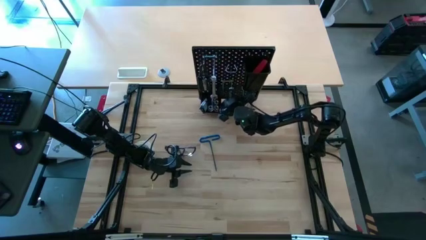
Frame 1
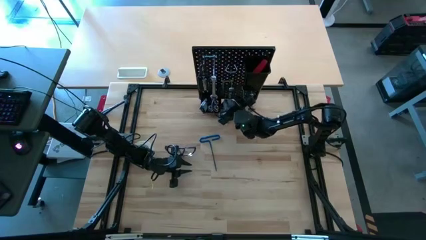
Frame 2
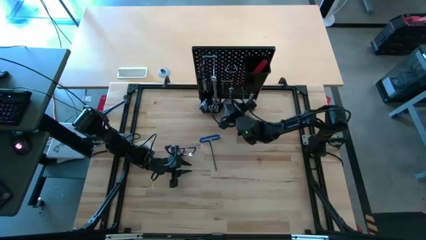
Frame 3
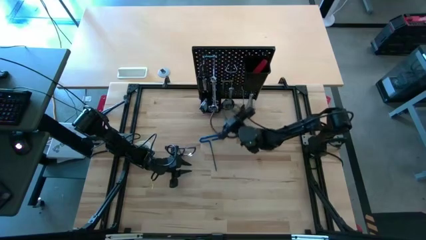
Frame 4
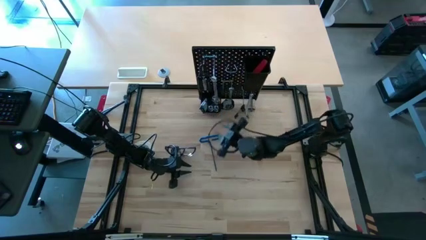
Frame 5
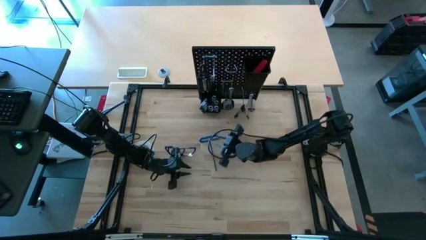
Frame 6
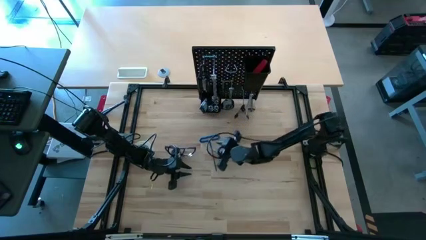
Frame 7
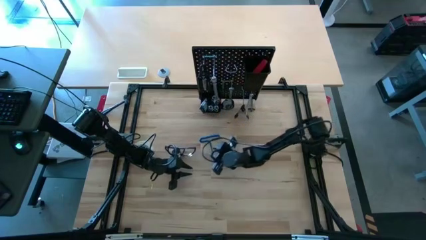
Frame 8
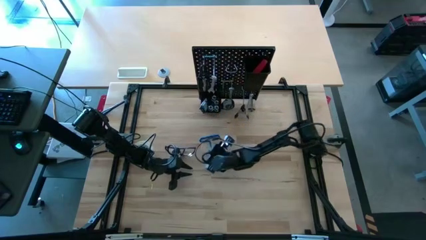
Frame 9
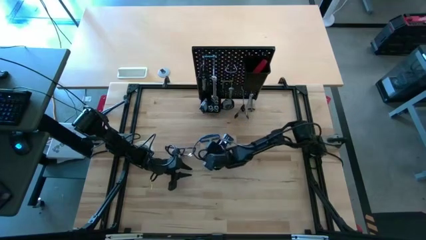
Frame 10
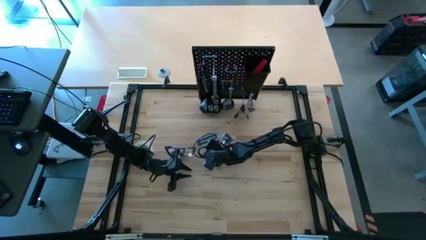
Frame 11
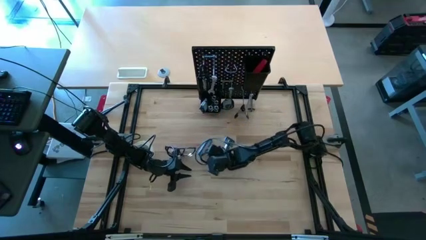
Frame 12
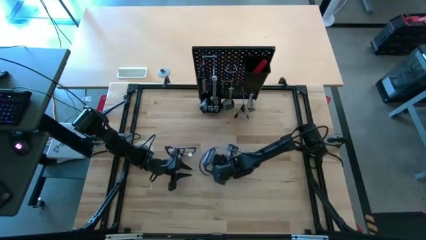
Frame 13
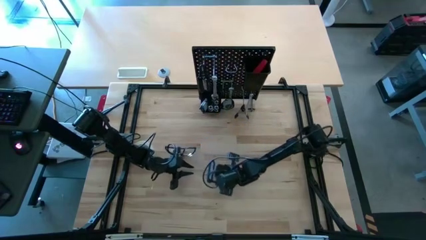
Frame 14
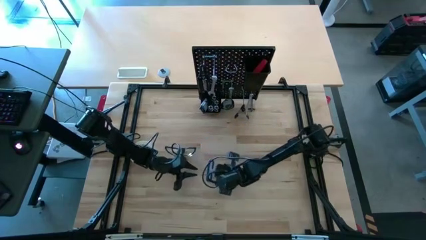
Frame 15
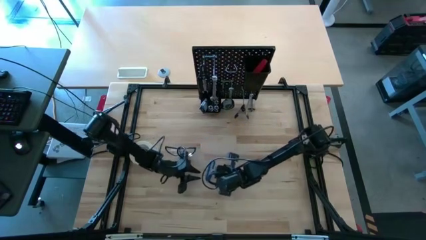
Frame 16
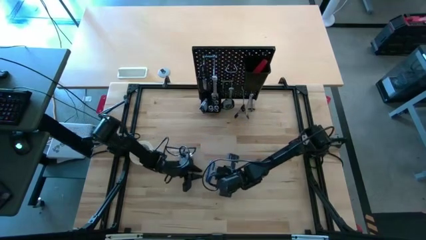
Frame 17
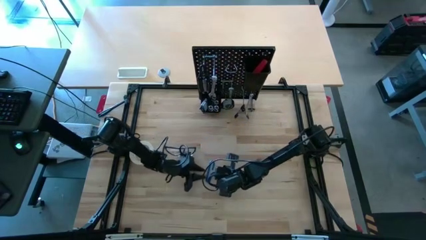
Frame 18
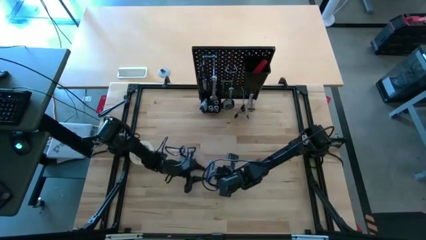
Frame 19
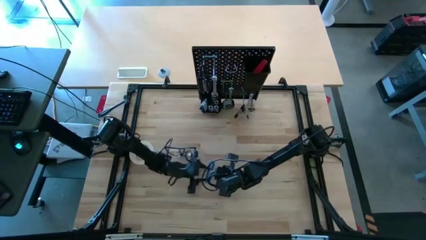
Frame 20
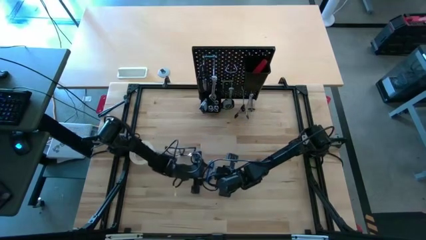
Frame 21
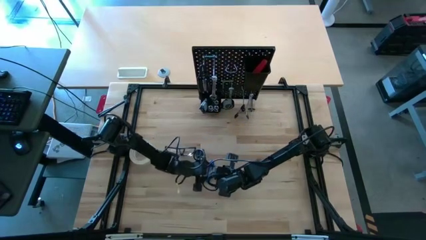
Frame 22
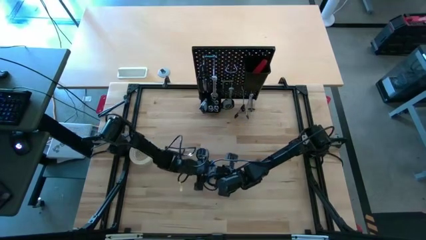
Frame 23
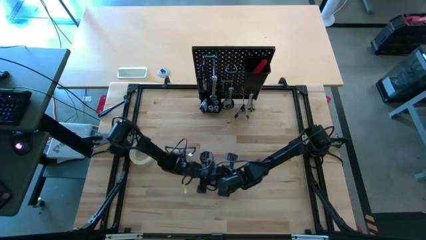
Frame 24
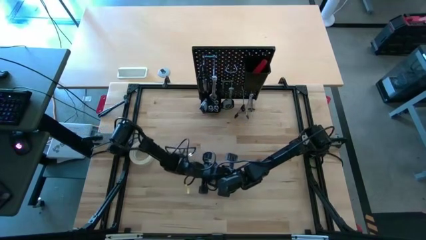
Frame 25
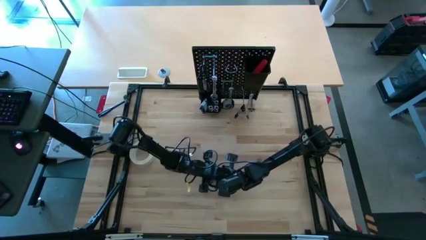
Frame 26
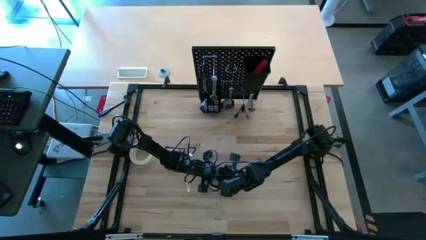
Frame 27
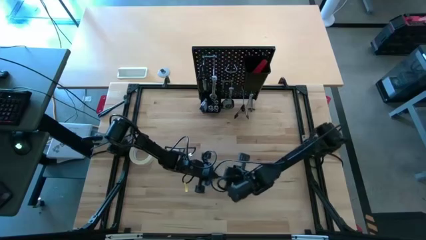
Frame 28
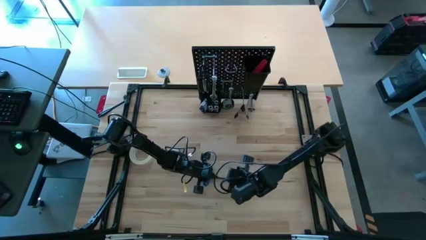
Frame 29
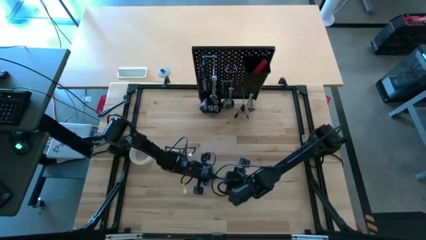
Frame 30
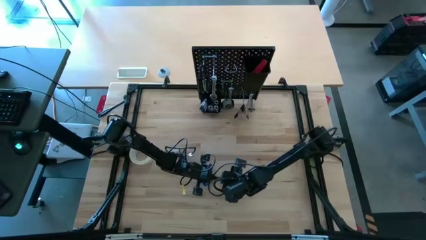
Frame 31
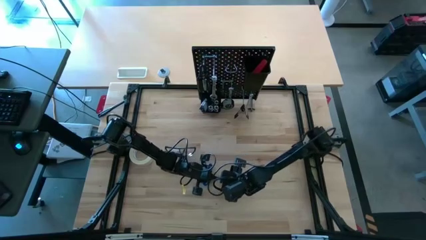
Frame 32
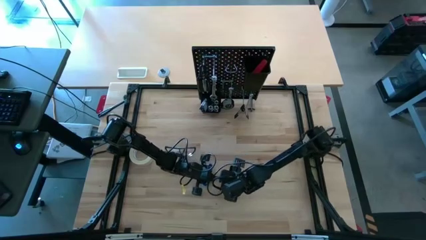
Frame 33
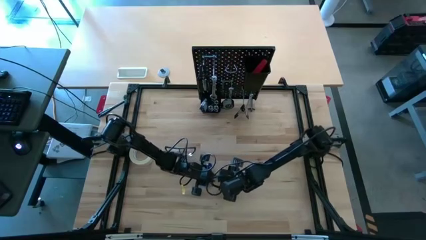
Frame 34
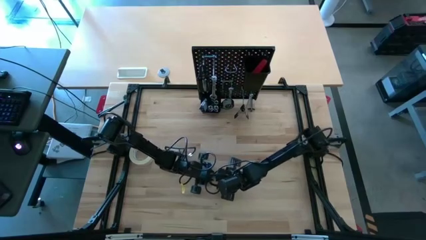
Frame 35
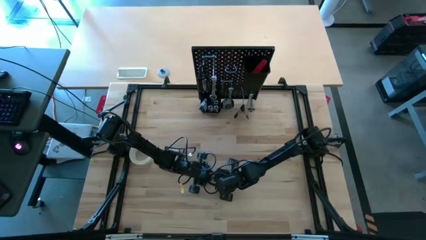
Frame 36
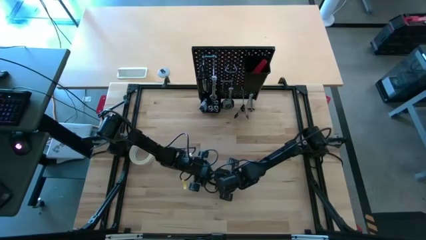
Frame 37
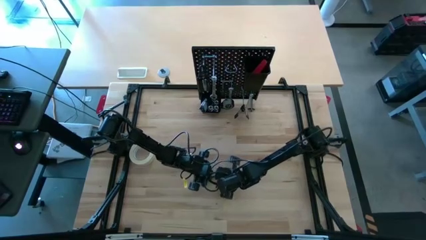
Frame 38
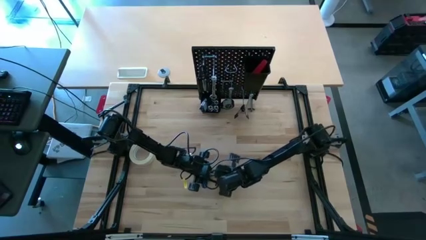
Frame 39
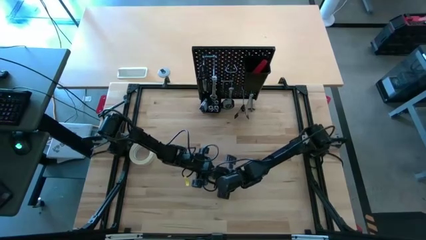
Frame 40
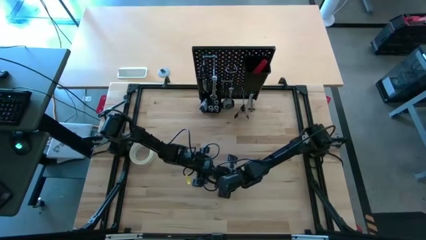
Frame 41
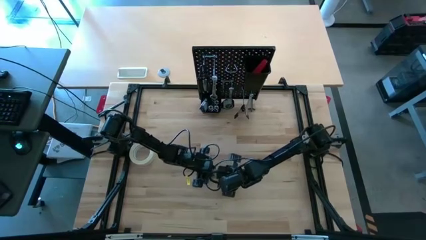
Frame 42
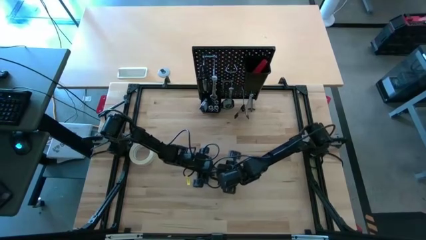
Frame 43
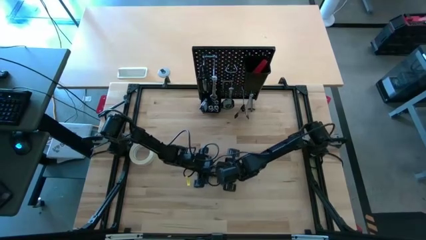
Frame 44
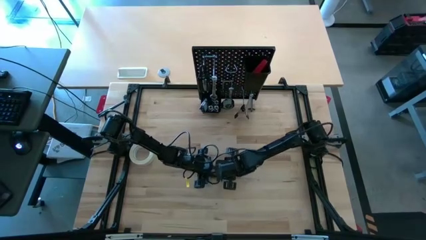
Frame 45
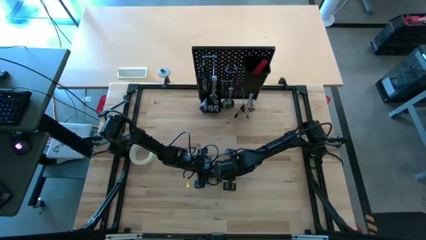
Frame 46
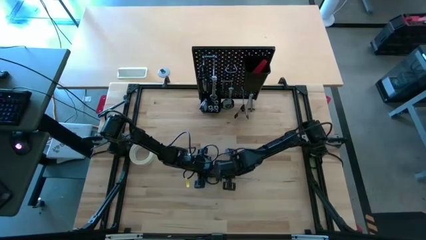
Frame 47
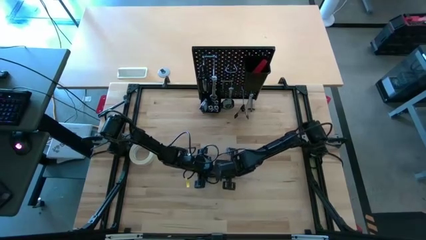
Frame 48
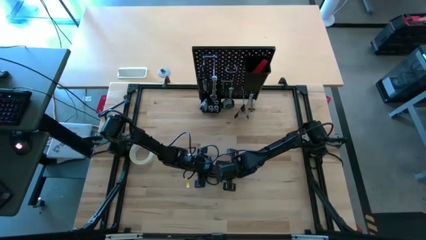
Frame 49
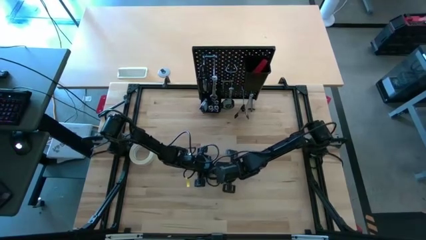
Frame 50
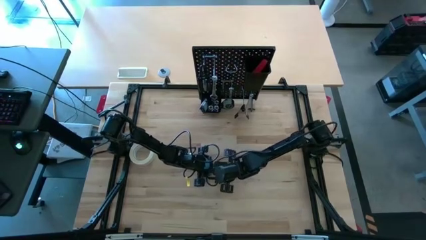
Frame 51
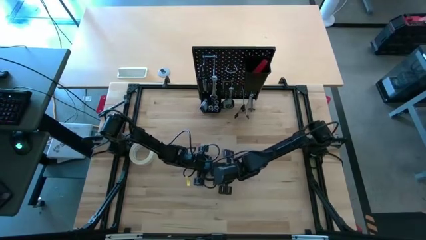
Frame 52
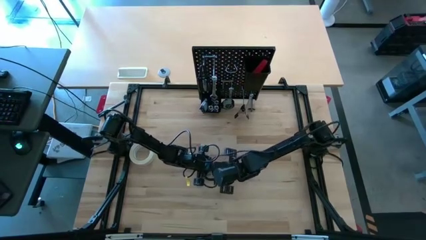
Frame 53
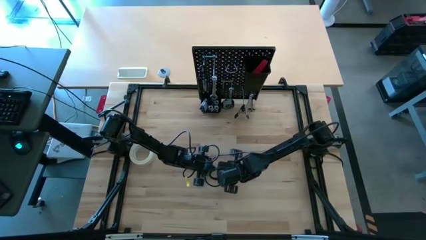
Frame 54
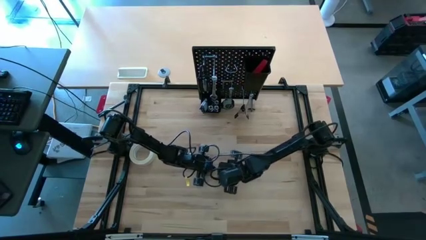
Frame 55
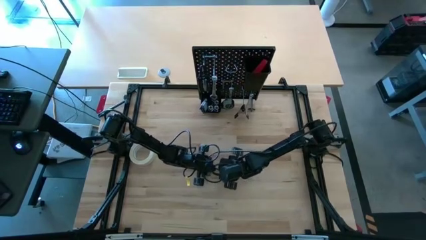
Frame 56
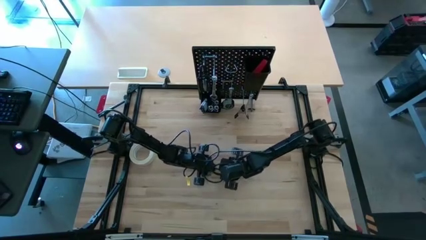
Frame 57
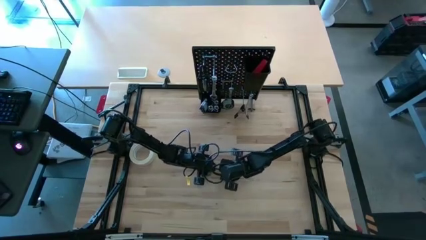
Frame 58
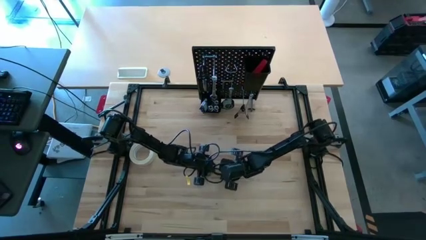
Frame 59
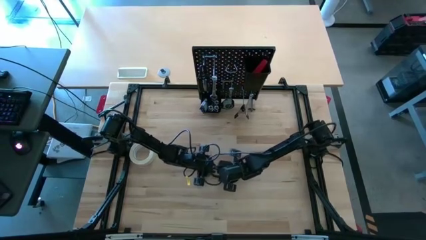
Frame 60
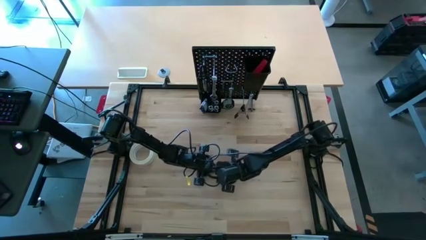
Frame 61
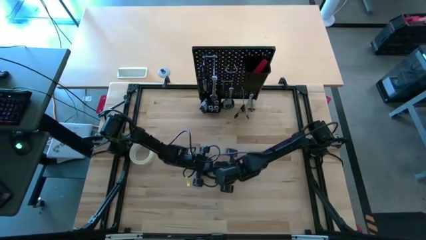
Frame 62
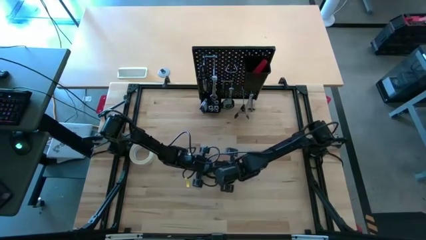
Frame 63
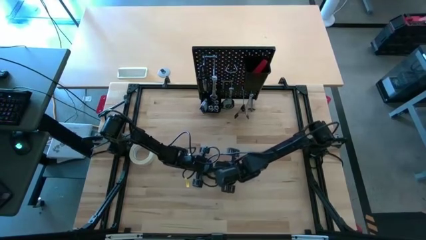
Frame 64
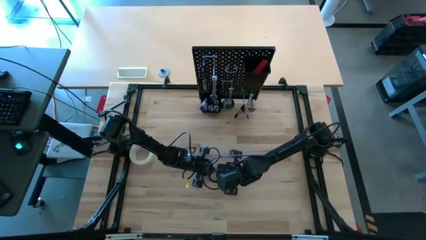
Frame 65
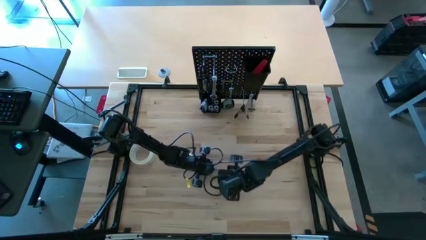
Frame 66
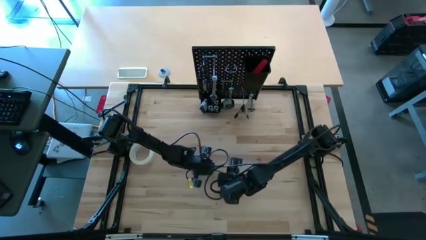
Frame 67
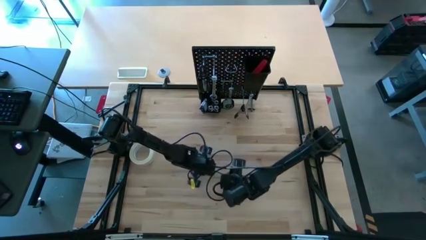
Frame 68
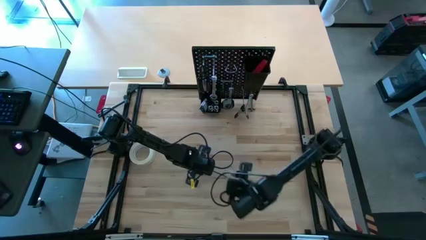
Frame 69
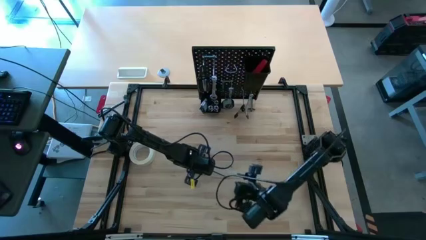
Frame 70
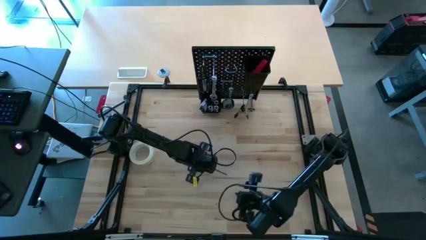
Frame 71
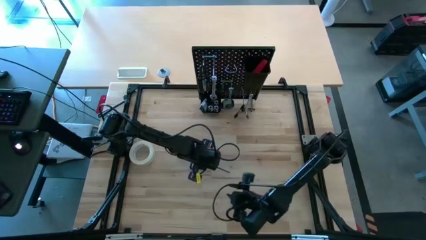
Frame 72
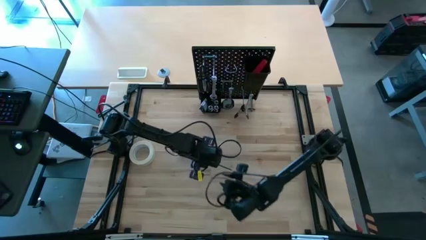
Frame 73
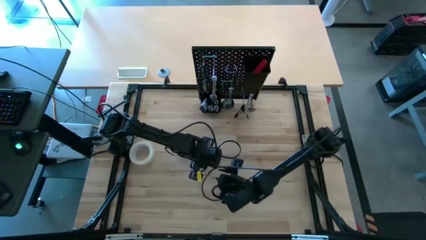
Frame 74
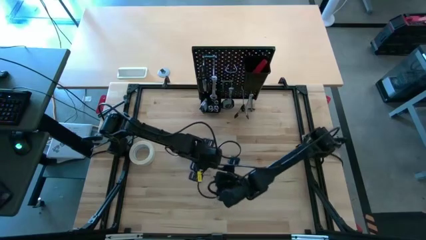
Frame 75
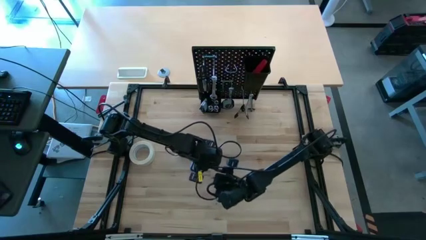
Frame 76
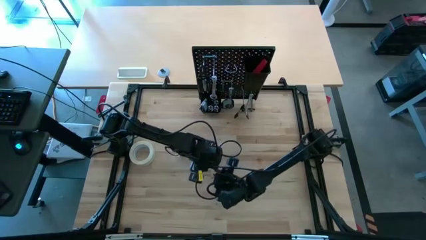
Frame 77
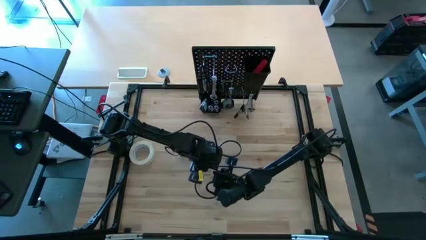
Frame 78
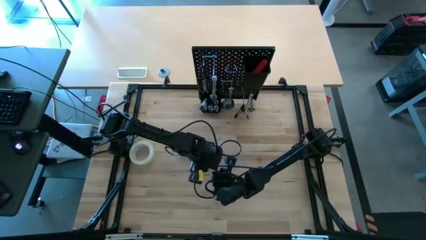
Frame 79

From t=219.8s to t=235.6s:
Task: Hang tools onto peg board
Put the pick tool into the black bin on the peg board

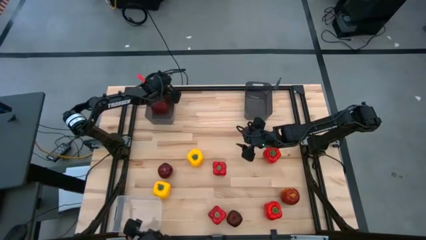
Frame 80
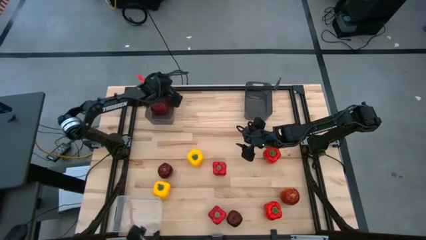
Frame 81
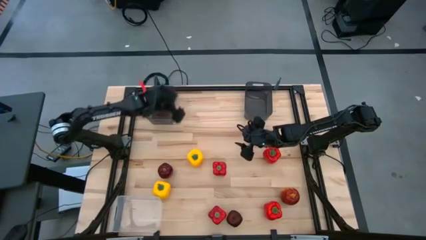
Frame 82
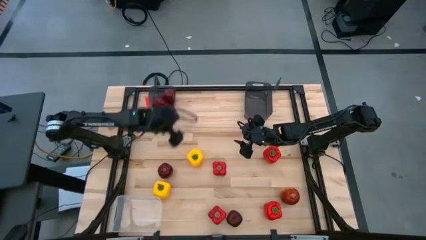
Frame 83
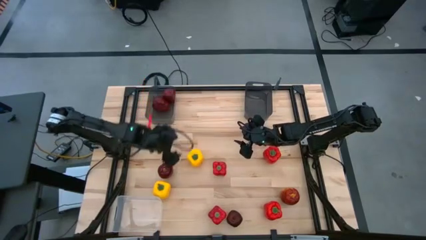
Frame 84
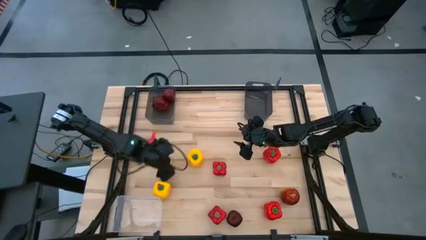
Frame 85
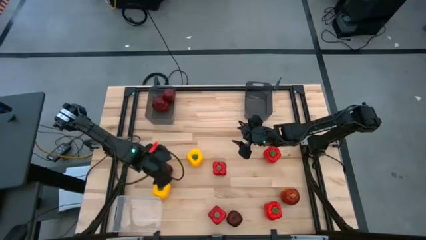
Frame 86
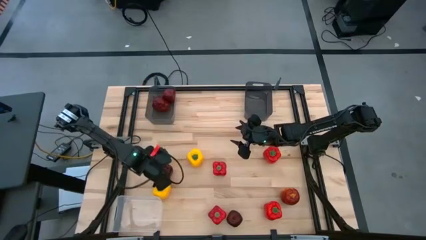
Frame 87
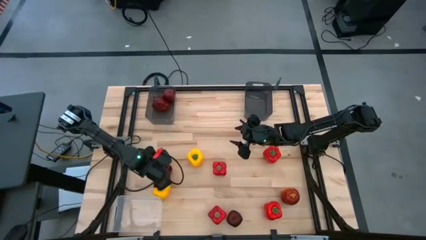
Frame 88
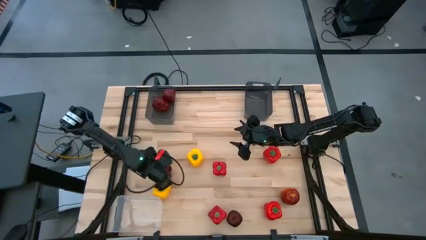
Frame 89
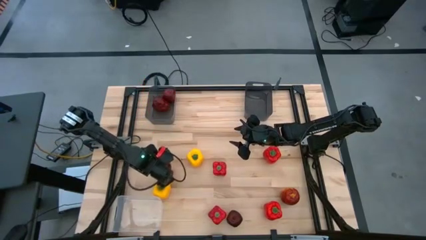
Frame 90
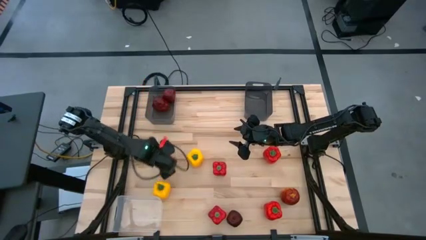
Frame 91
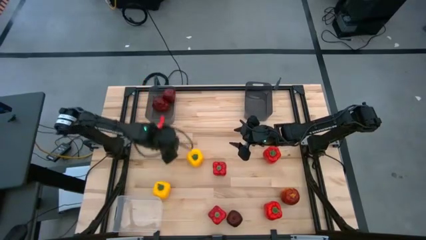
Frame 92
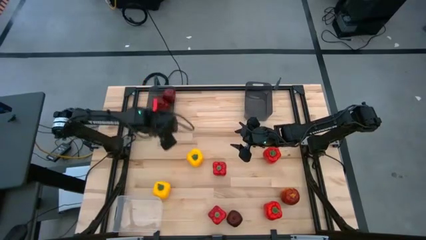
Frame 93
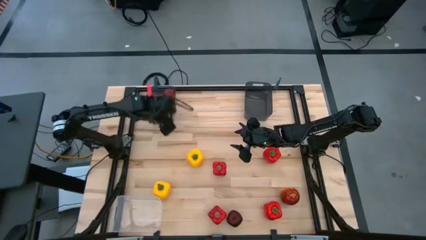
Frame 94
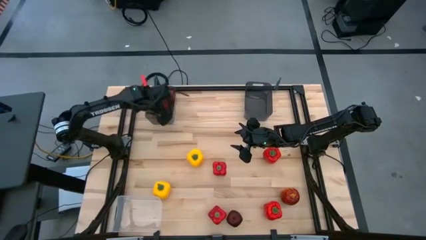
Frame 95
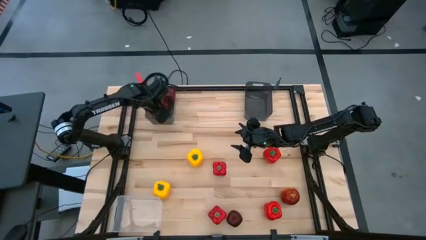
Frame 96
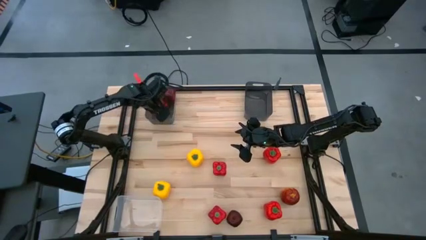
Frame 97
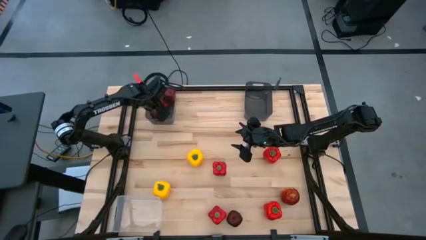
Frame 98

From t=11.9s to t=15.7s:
Task: Sort produce into baskets
Put the red apple into the left black bin
